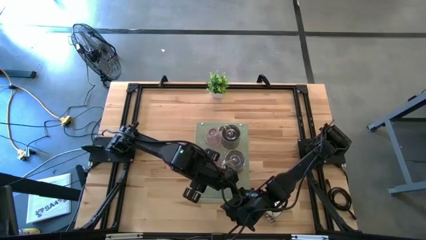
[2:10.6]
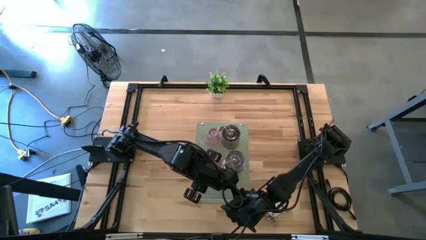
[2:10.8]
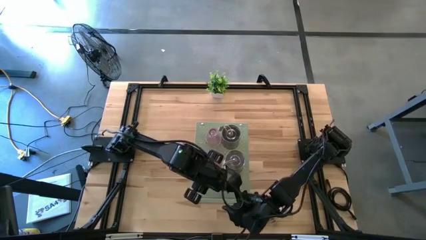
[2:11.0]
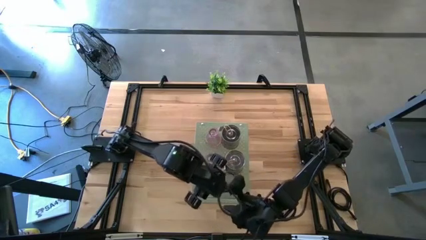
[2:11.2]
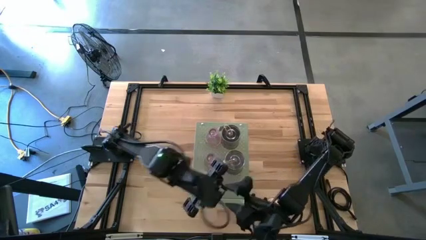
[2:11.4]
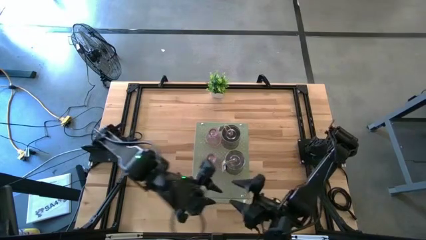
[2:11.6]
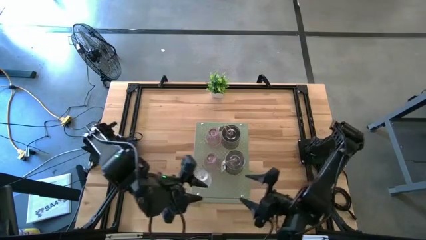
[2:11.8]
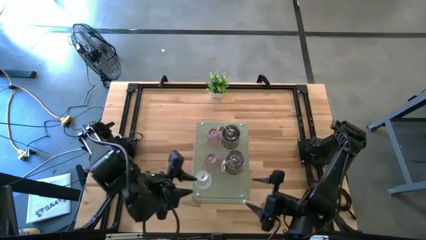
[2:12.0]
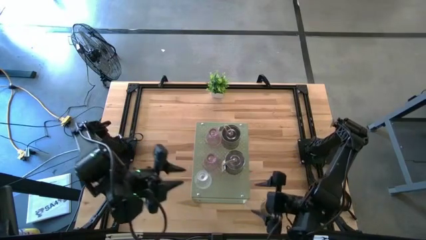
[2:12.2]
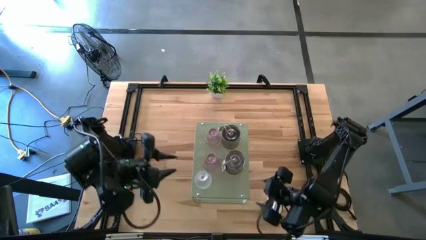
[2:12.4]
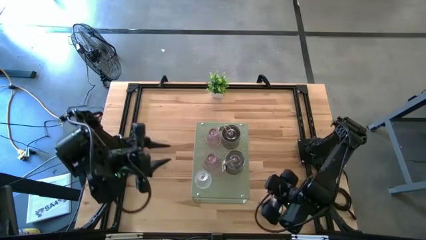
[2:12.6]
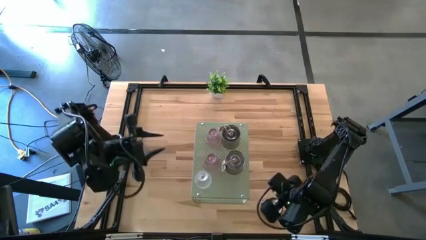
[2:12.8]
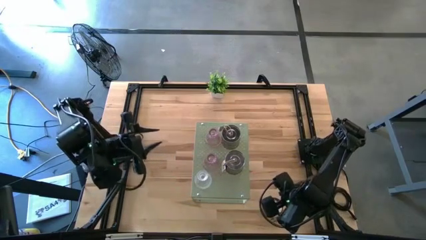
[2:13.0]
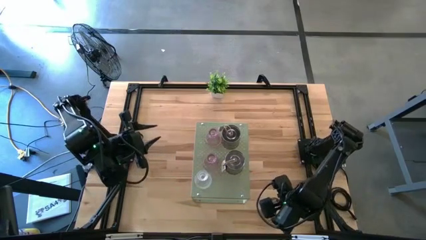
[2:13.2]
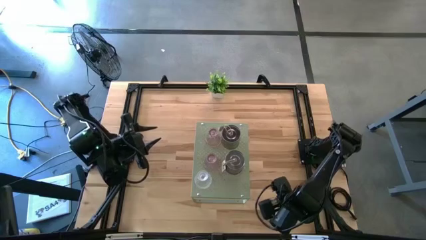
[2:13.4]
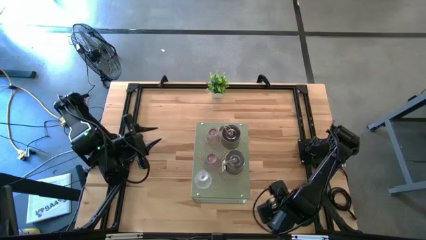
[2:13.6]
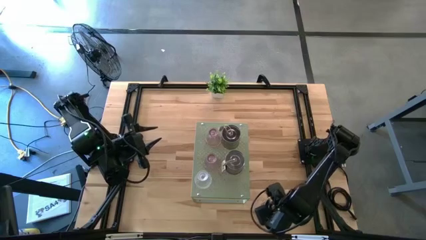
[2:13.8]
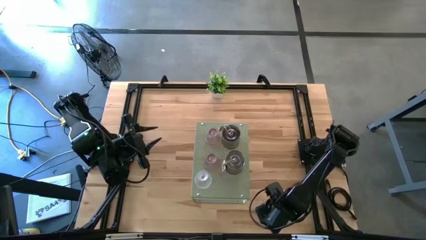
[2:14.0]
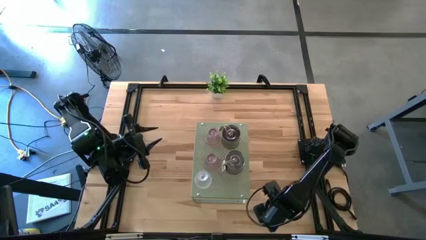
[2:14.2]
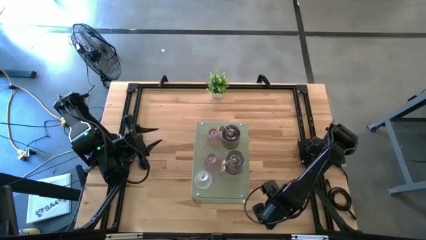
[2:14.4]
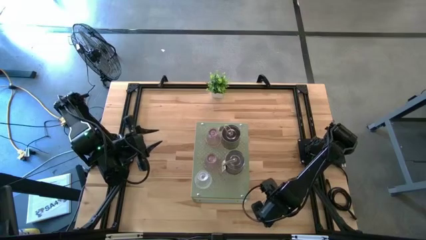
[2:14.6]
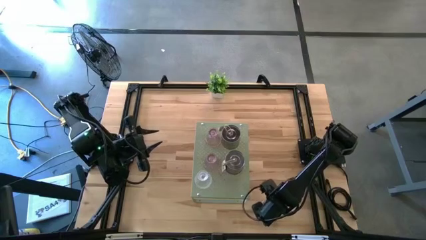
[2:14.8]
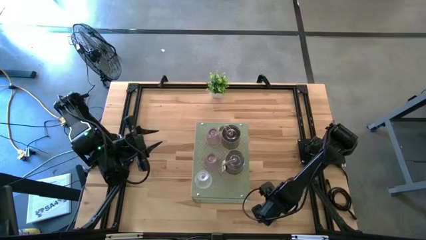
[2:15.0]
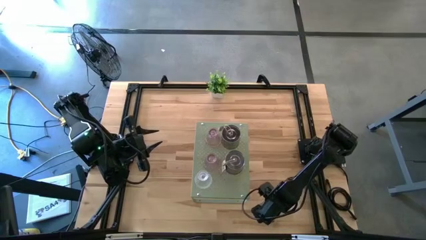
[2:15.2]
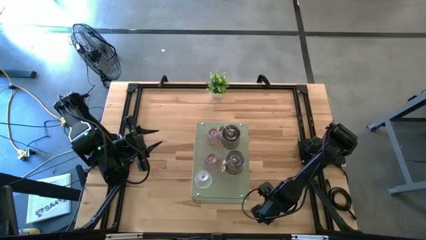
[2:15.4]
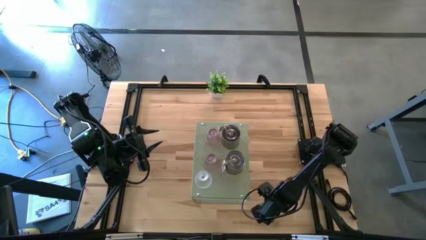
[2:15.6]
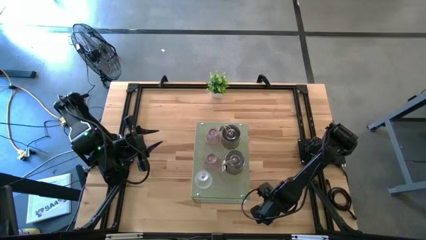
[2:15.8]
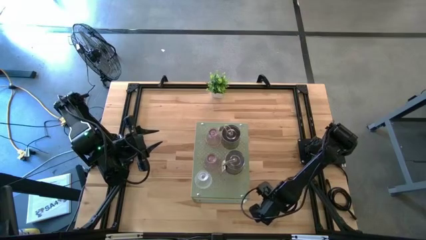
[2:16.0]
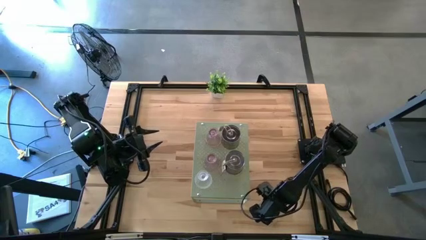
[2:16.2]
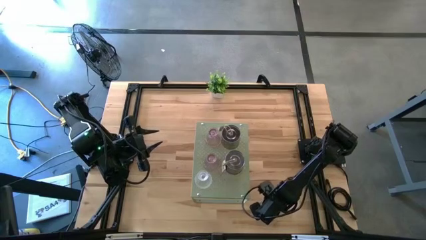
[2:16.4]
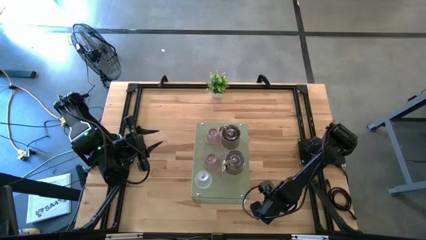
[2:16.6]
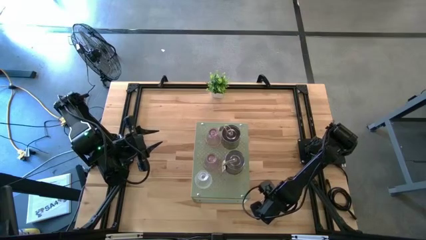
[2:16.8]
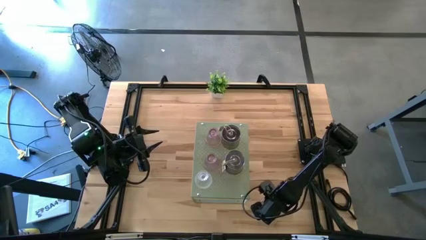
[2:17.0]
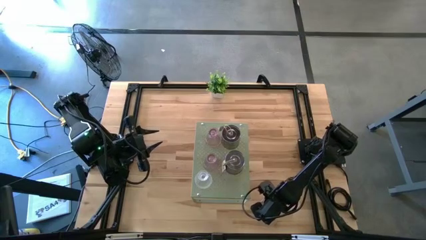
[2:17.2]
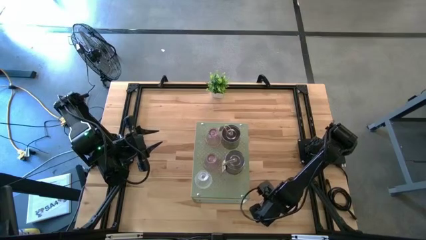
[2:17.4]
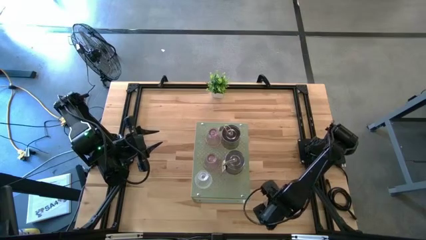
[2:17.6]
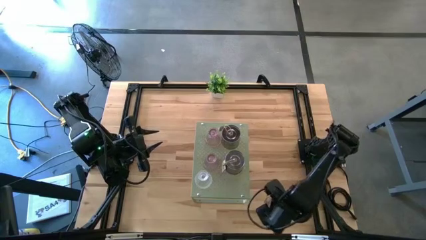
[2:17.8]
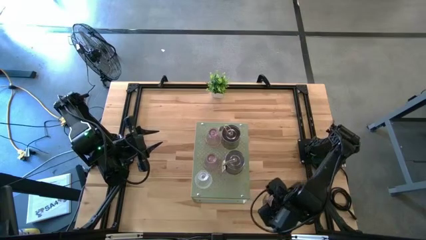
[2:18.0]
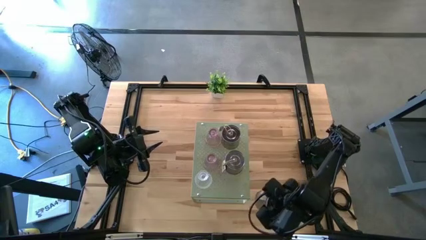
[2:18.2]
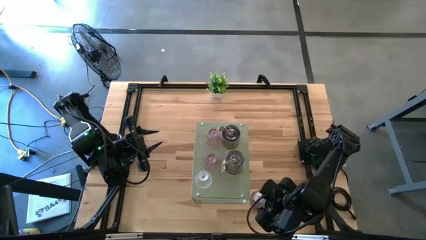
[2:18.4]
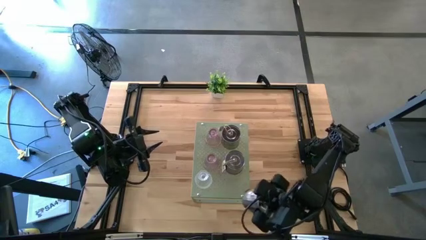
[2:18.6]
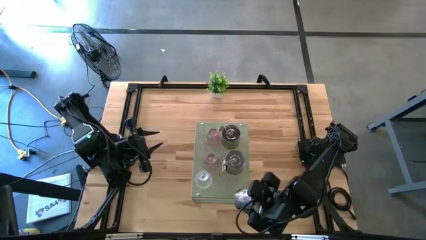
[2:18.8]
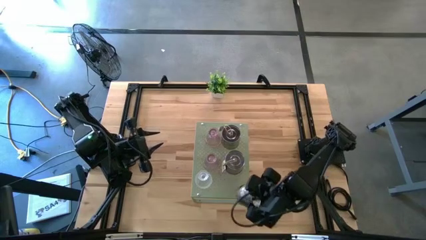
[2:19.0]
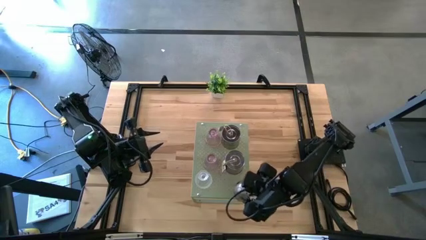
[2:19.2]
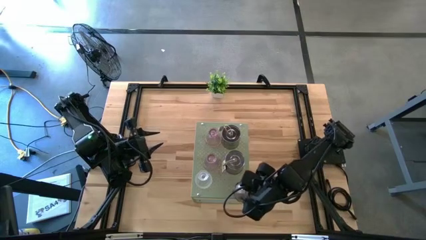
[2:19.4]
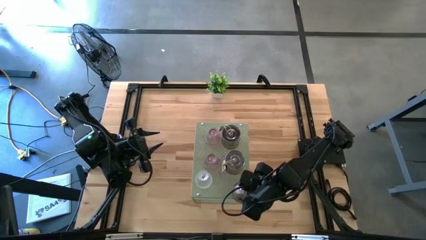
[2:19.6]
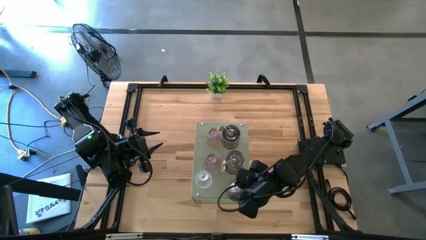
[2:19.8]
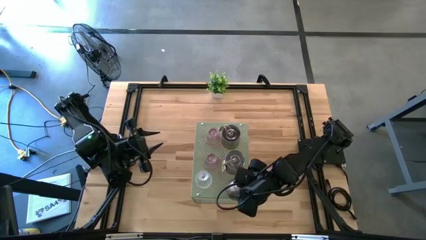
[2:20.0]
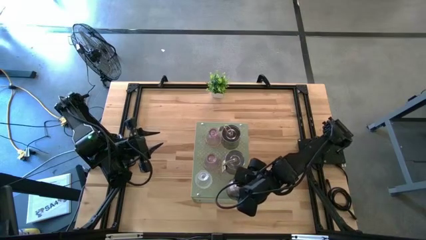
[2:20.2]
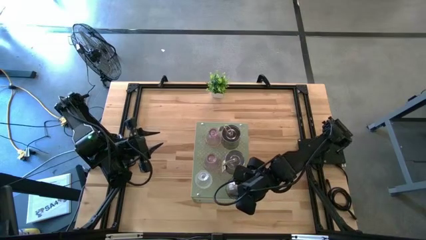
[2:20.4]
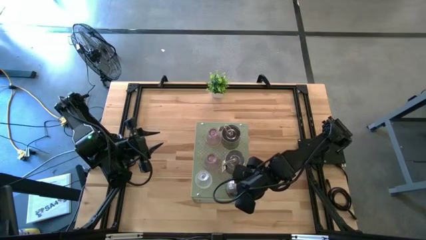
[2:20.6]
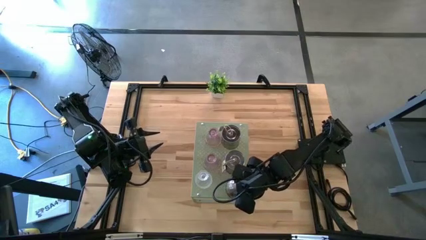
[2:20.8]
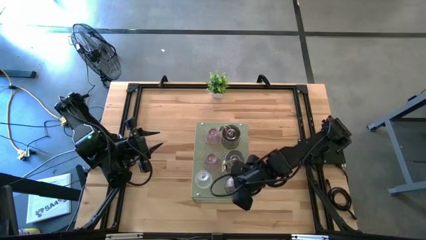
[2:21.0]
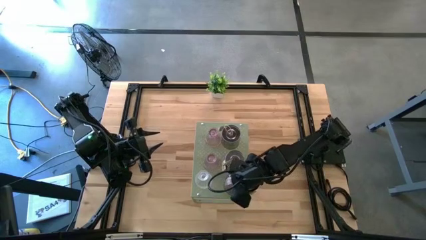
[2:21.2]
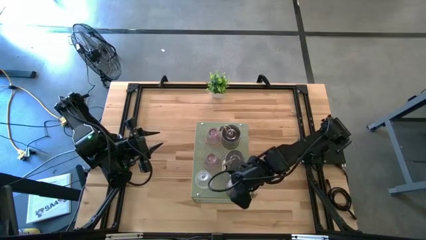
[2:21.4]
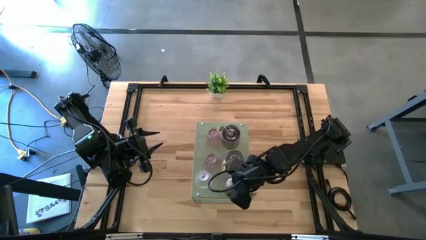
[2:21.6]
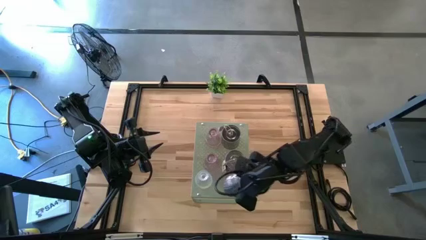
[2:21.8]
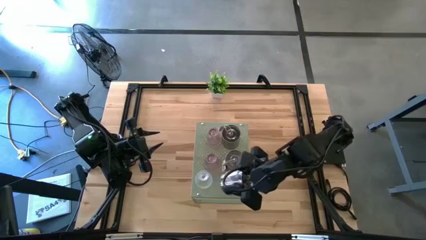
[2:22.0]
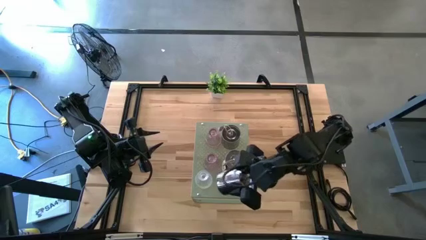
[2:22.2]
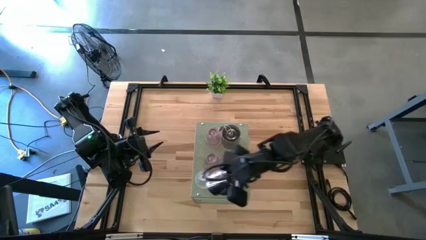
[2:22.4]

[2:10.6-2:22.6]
Task: Pick & Place candle stick holders
Put the silver scented candle on the shelf

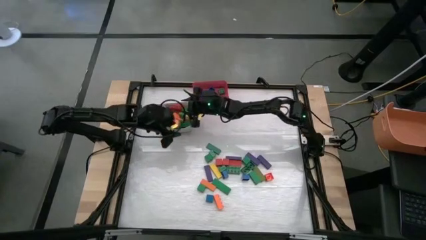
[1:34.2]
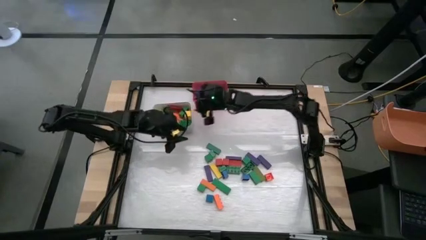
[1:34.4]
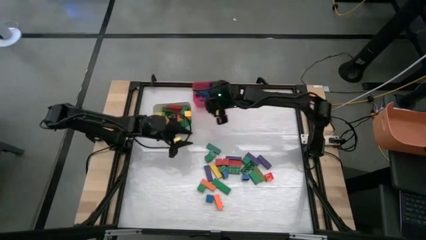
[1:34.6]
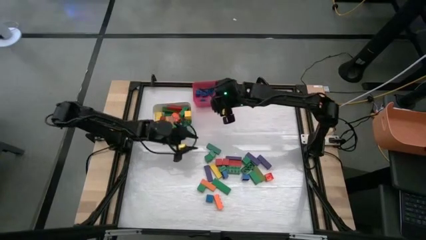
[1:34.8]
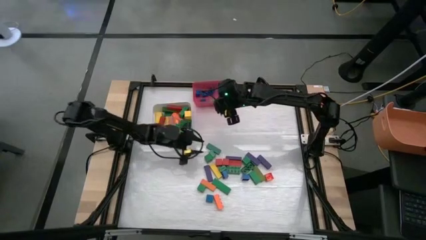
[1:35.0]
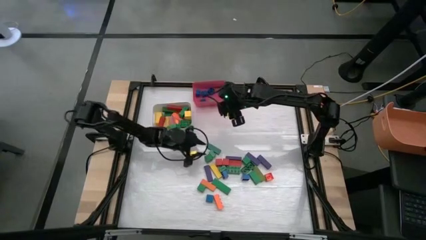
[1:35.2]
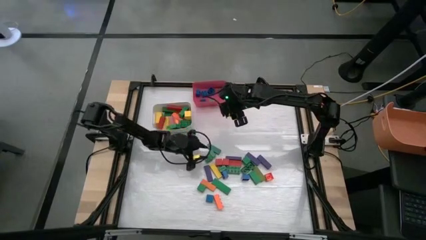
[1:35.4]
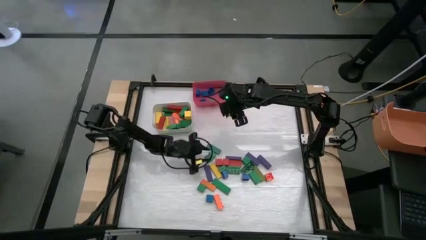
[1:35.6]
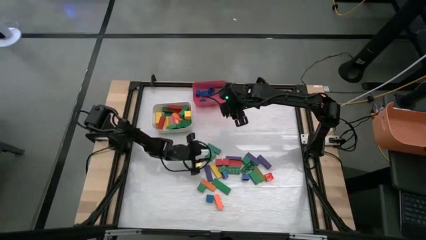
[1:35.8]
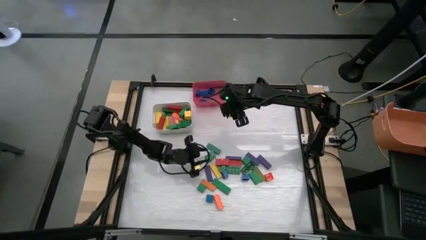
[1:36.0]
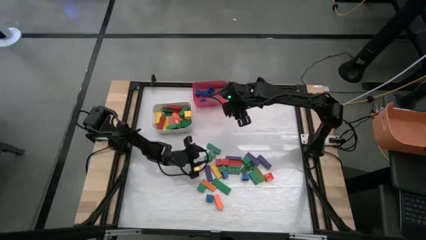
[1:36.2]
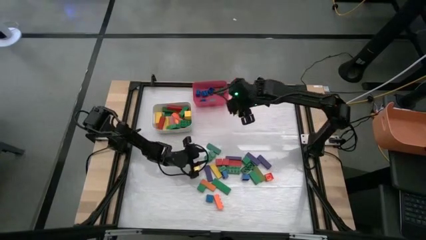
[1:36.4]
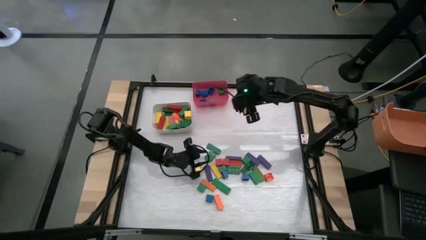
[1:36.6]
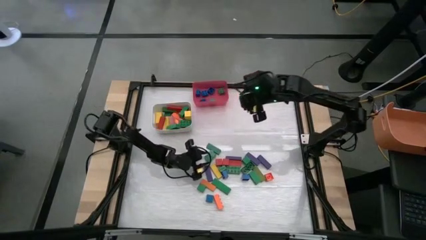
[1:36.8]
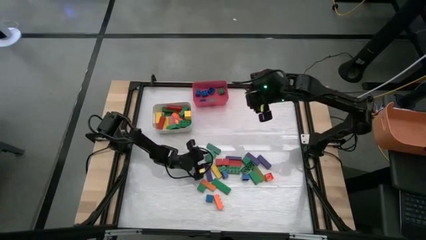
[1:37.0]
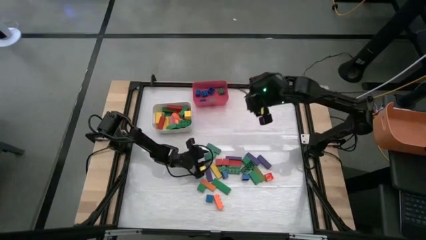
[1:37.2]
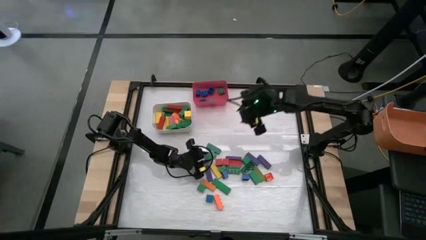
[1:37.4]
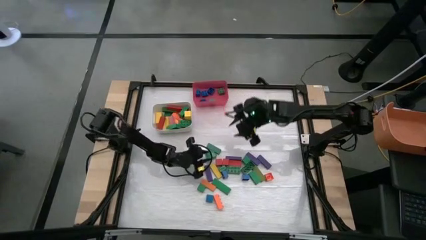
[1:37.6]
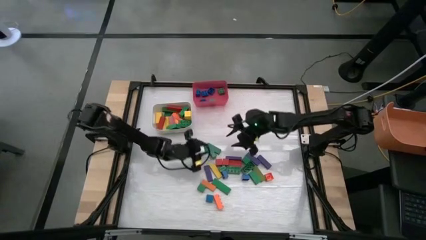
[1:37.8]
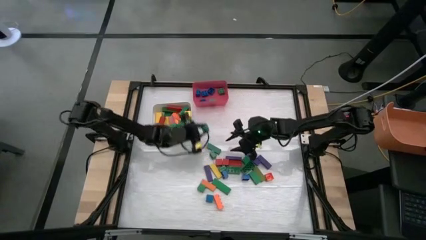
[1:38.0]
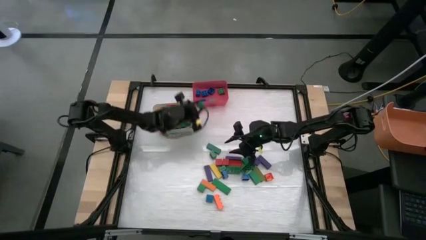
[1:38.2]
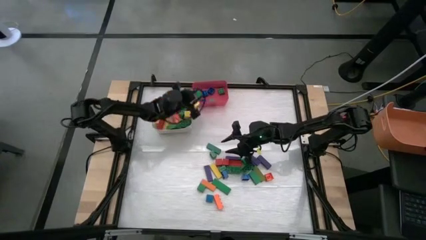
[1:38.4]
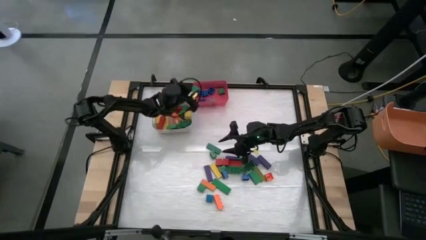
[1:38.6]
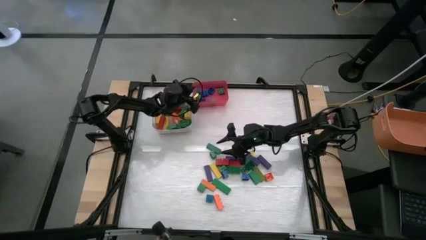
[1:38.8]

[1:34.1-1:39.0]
Task: Sort blocks by size
Put the small green wooden block into the red bin
